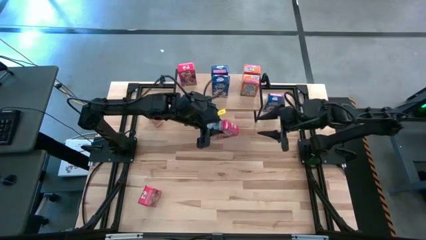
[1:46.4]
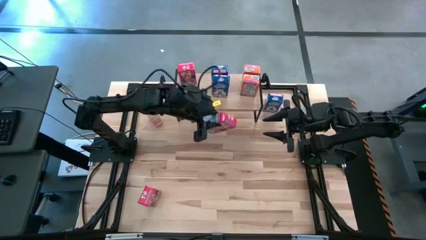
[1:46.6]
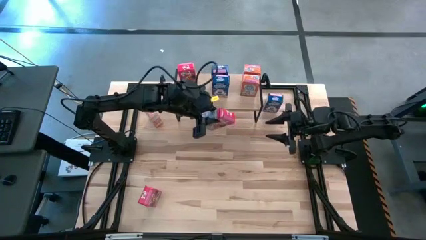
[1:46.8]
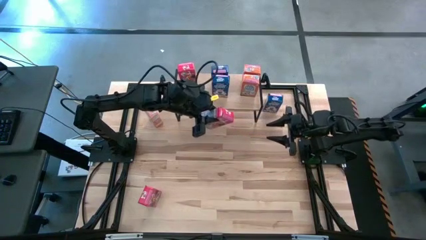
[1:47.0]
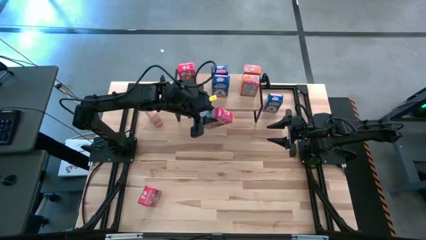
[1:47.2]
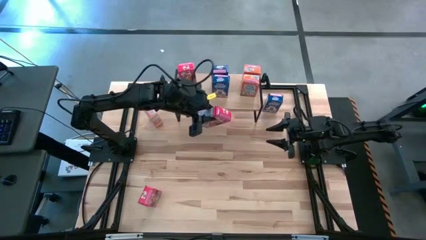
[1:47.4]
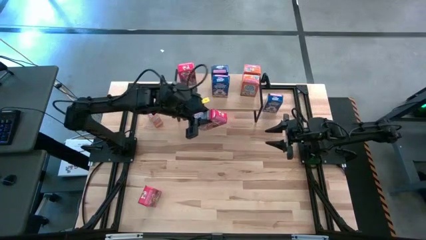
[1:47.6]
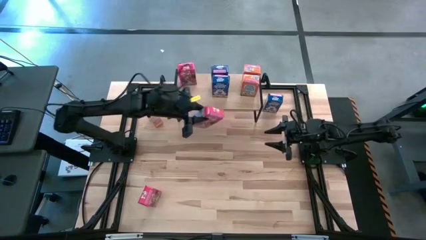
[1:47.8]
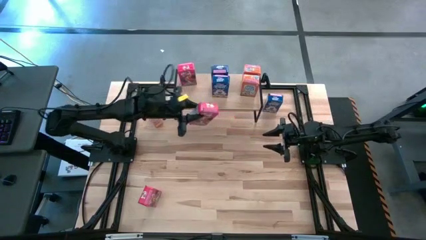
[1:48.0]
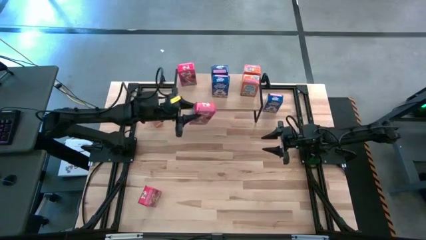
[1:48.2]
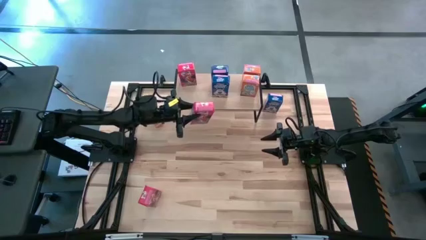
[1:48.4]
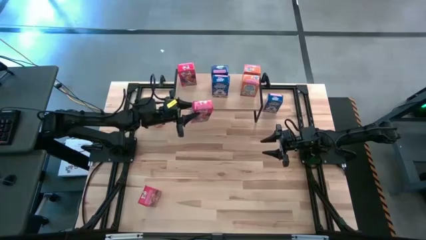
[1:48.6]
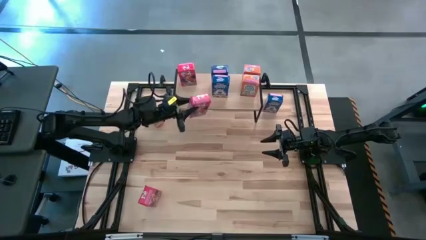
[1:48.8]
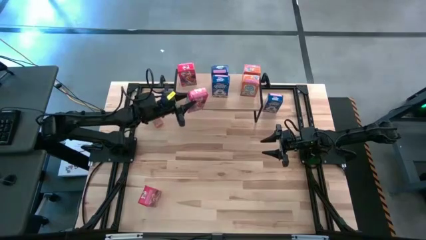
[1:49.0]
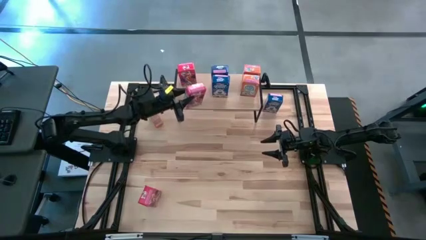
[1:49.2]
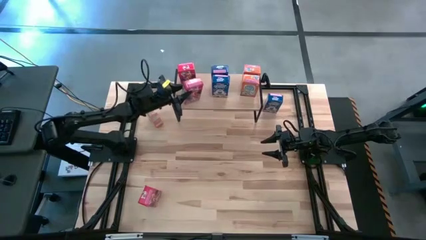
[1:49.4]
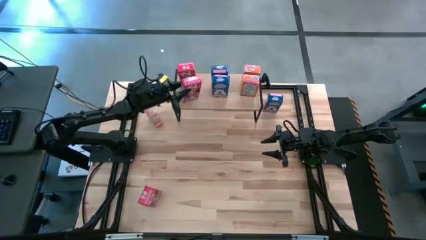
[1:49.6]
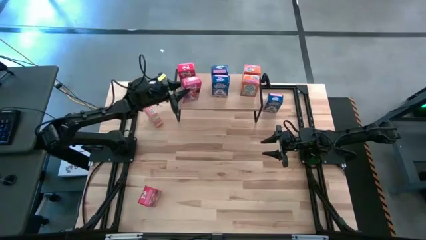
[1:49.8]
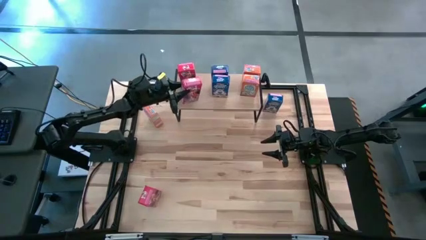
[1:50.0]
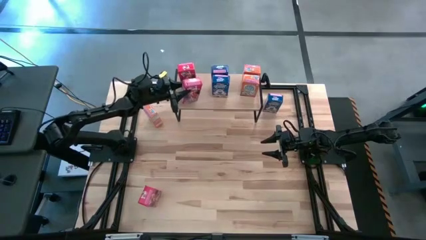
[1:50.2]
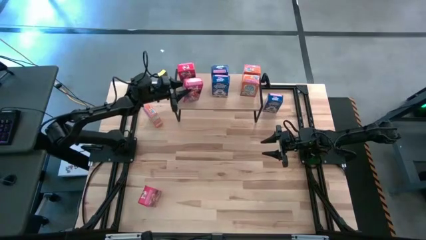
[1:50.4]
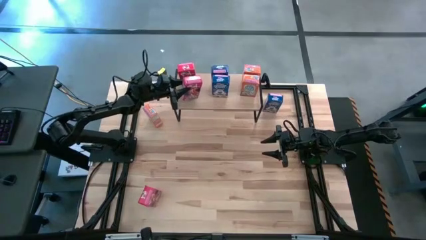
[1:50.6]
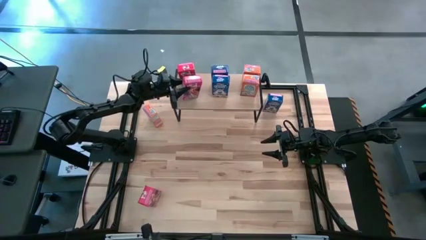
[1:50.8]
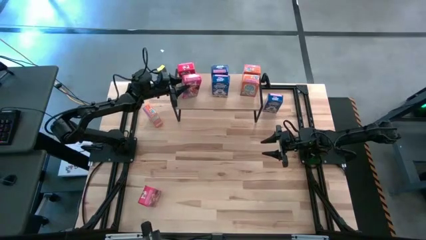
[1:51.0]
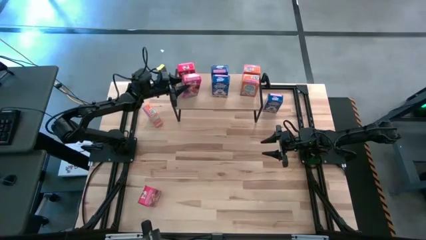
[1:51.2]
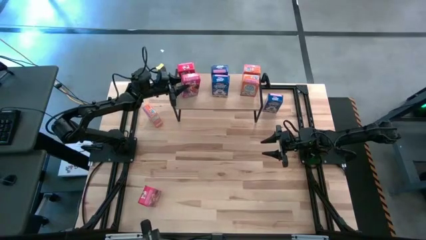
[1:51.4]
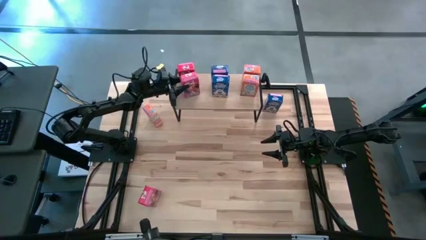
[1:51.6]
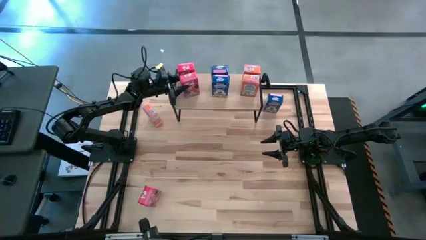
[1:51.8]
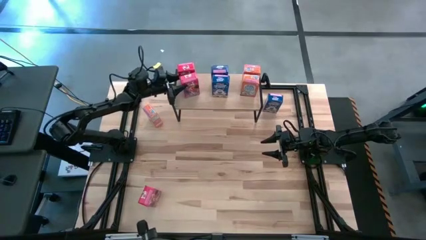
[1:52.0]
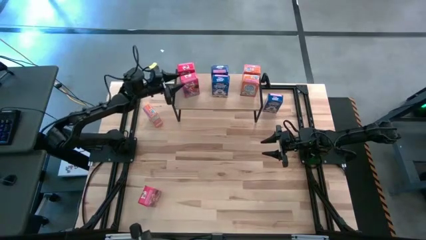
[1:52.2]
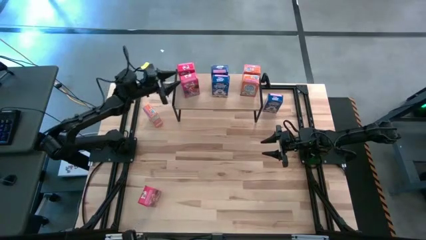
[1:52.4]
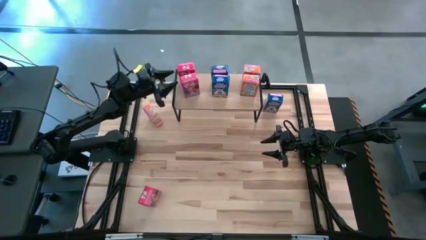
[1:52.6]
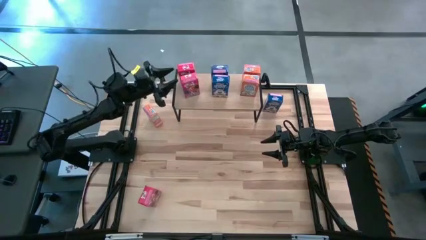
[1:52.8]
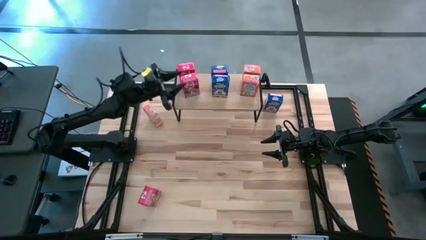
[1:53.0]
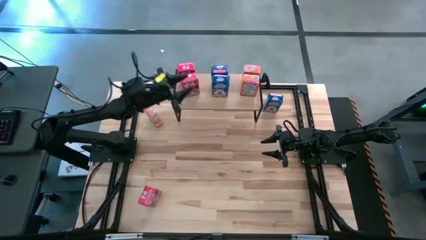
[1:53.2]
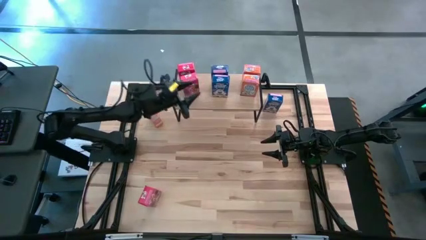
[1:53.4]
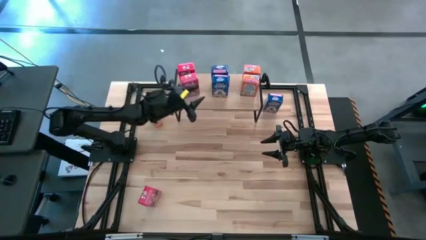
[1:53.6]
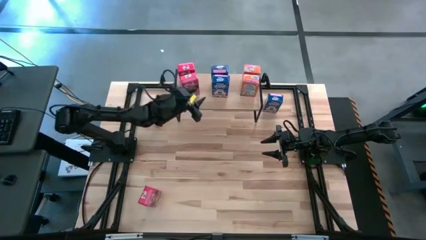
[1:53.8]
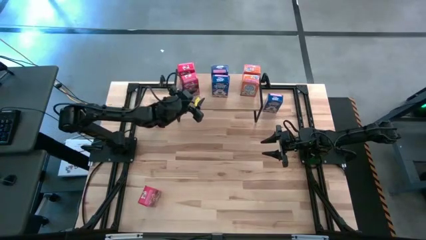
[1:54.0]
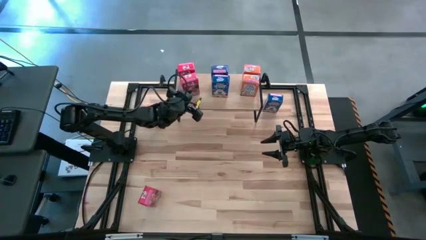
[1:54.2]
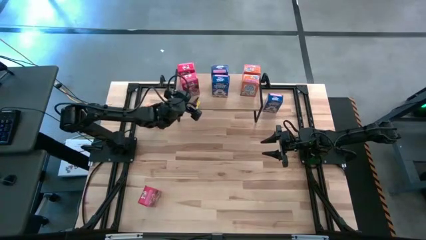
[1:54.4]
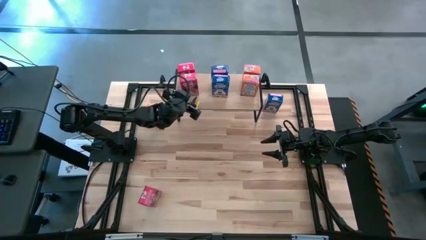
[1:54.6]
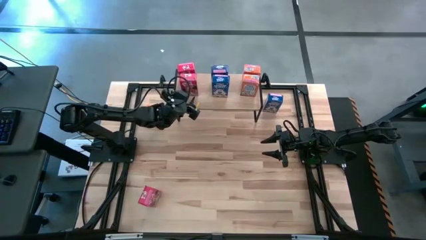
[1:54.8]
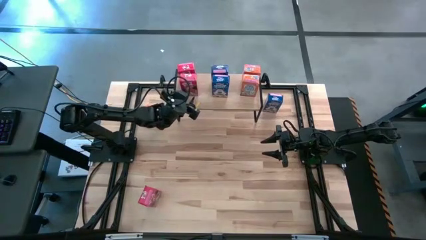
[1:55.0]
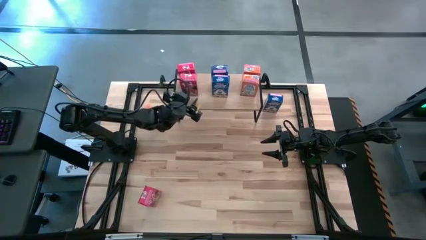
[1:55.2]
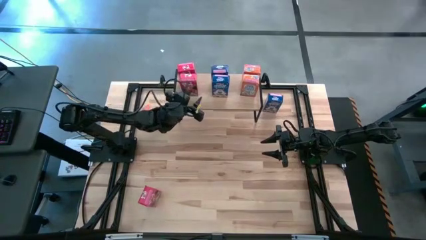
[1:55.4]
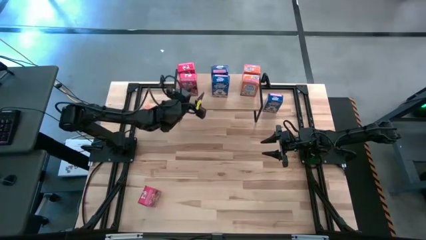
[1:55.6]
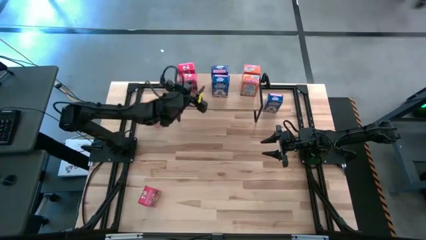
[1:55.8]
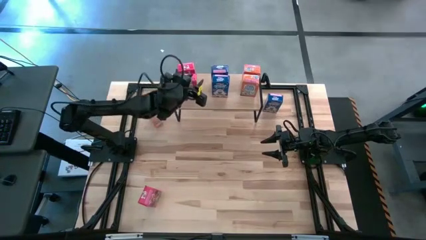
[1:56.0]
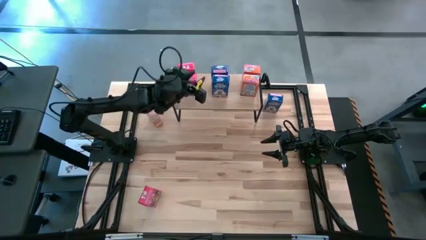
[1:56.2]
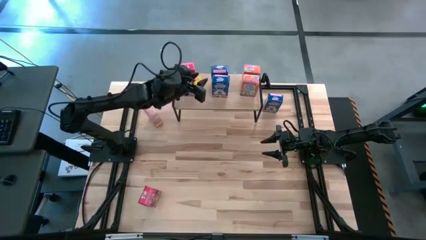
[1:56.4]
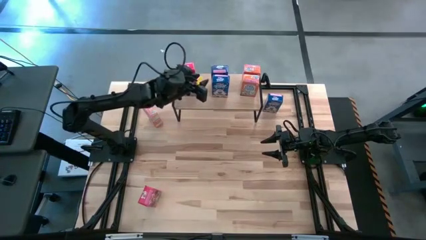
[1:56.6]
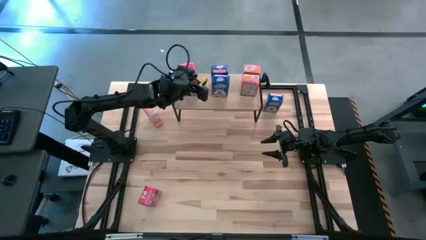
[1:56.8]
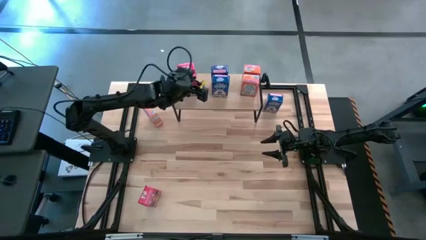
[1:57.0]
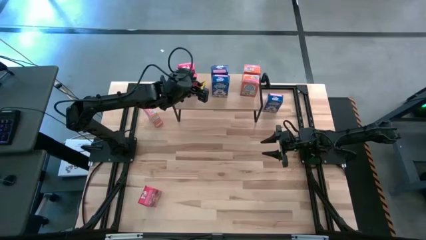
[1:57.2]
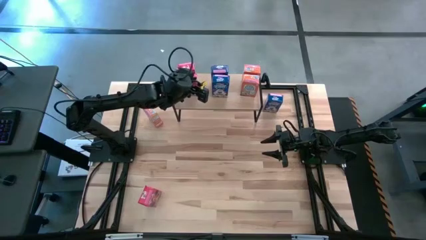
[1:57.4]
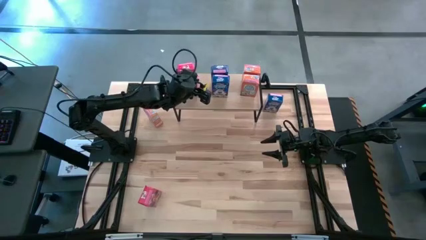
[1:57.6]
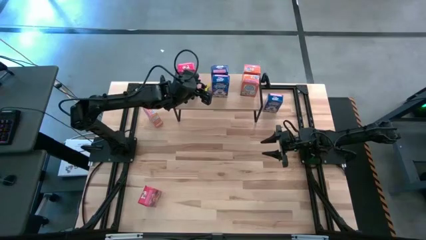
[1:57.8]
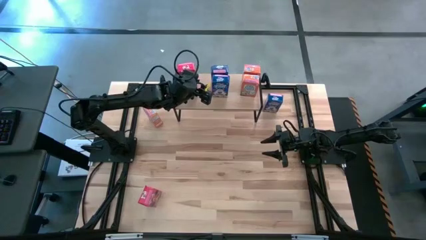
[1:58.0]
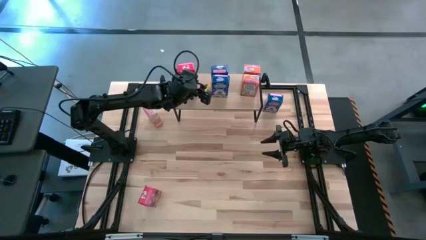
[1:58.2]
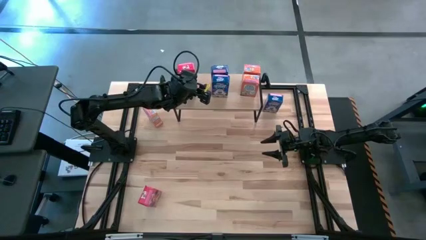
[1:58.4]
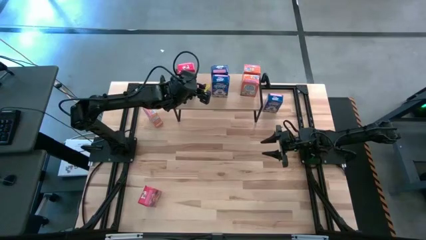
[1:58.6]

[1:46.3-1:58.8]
Task: Stack cereal on shelf
Put the right red cereal box on the shelf

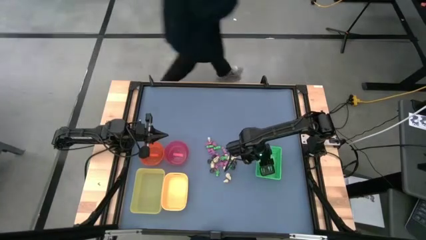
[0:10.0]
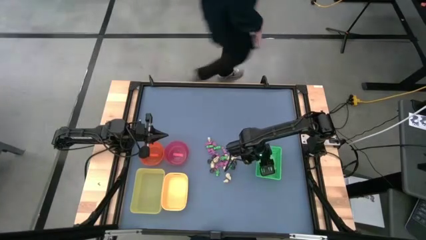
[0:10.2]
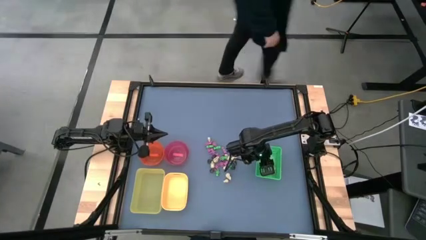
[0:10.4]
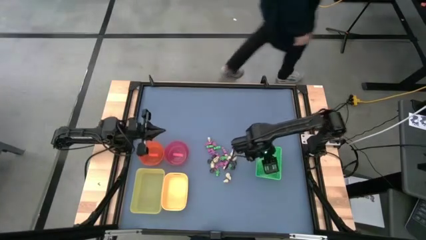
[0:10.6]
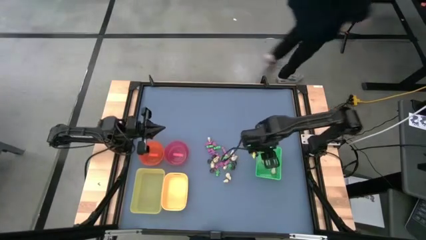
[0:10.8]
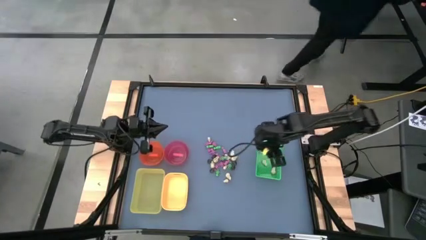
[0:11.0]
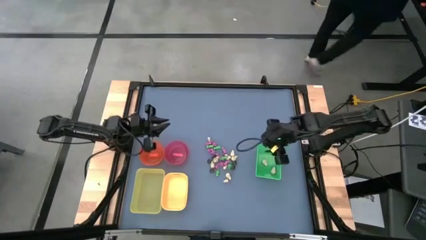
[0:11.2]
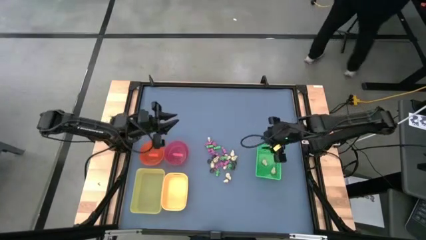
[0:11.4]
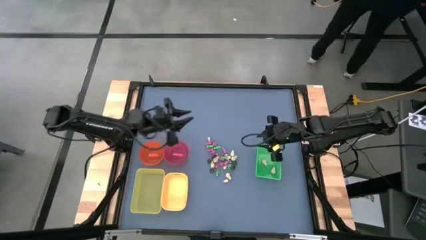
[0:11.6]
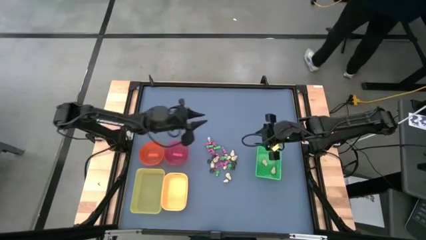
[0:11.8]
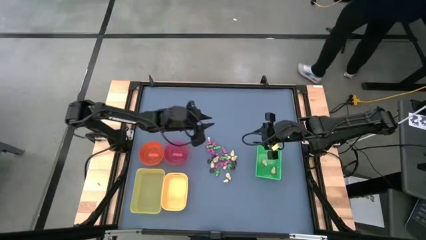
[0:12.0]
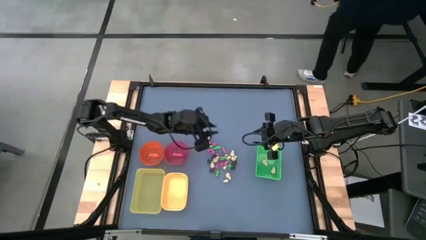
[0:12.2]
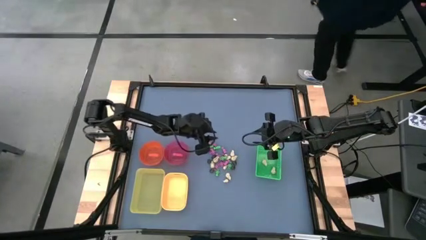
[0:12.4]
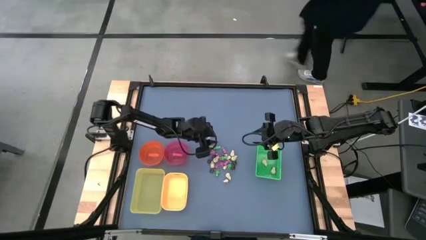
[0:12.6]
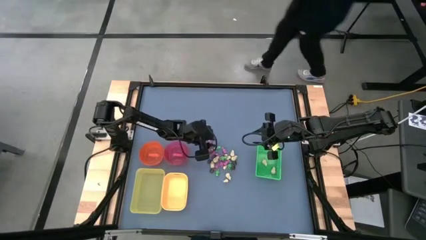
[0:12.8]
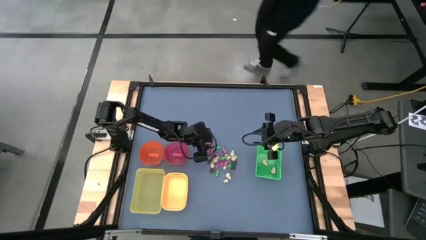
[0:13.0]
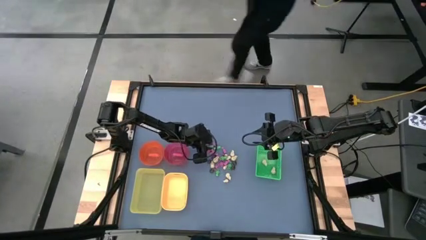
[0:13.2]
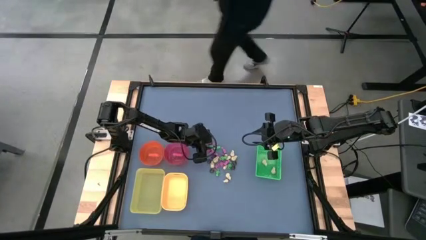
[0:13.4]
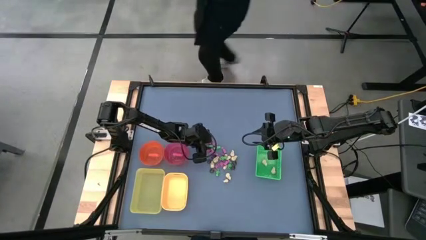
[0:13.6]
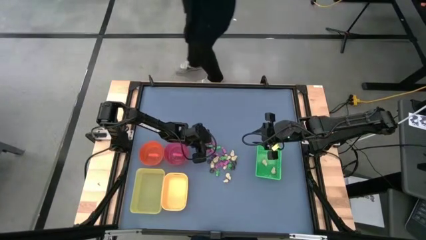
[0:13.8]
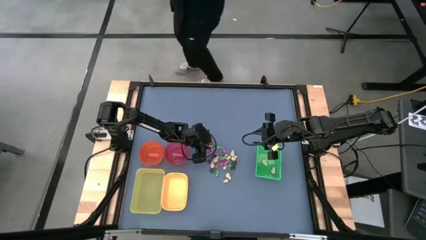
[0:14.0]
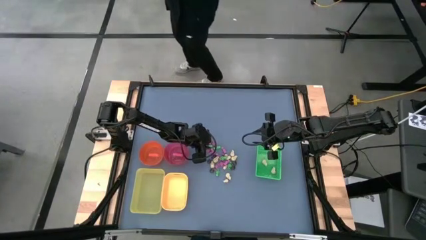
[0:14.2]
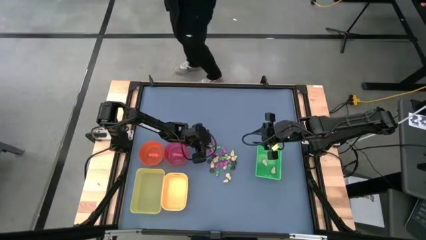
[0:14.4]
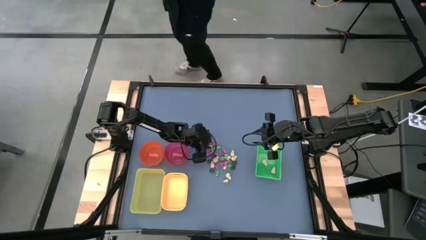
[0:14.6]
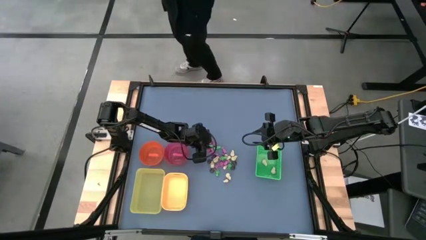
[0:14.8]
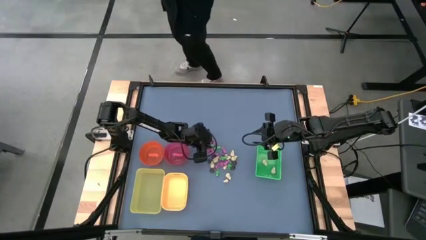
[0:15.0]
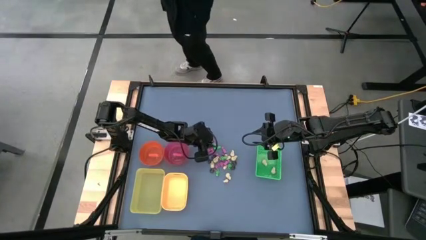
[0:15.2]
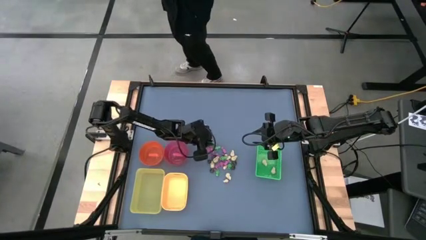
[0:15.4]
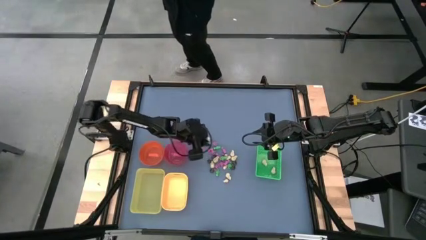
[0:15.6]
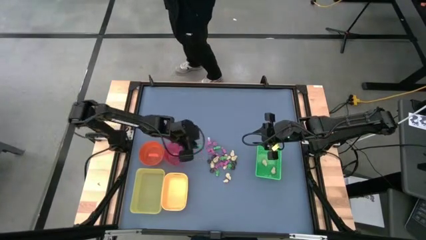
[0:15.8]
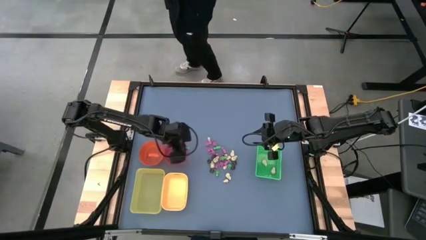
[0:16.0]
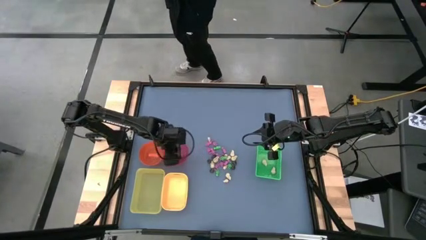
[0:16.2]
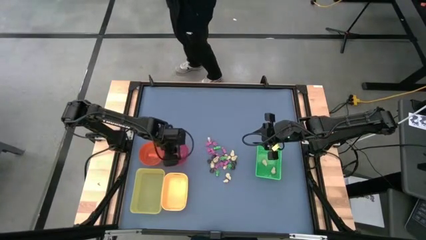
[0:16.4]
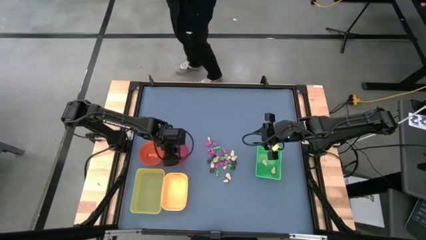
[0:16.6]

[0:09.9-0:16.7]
Task: Sort Halloween decoration
Put the green skeleton toy into the red bowl
